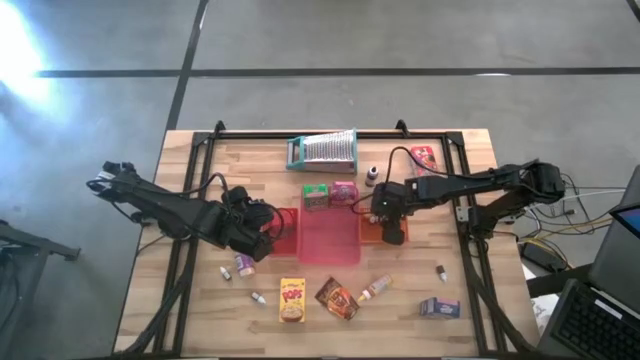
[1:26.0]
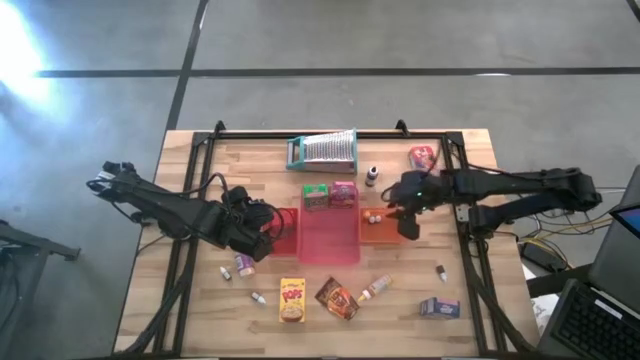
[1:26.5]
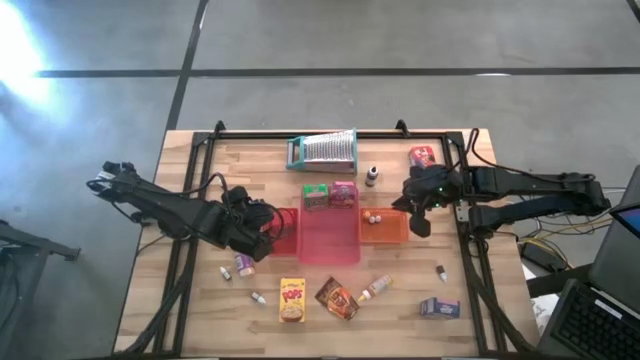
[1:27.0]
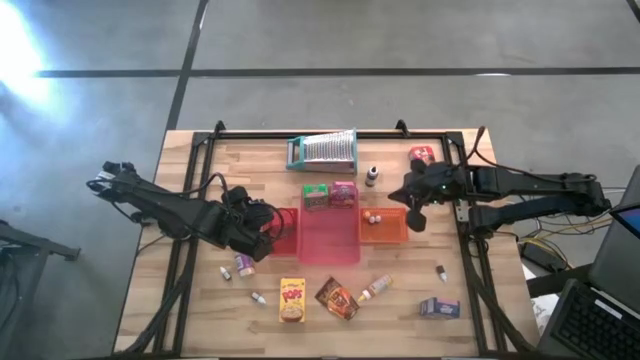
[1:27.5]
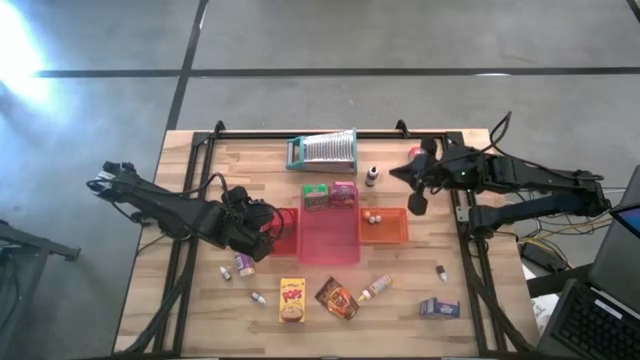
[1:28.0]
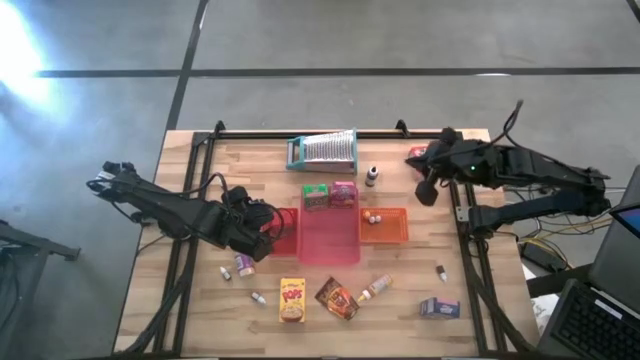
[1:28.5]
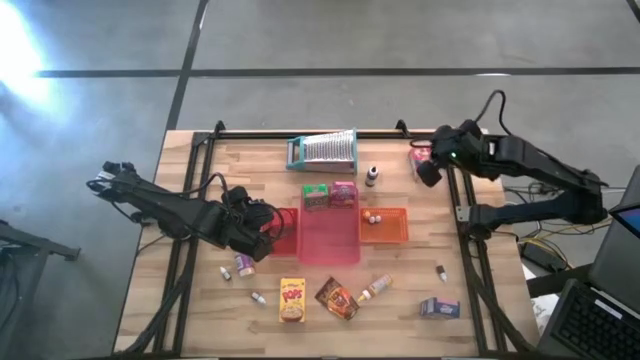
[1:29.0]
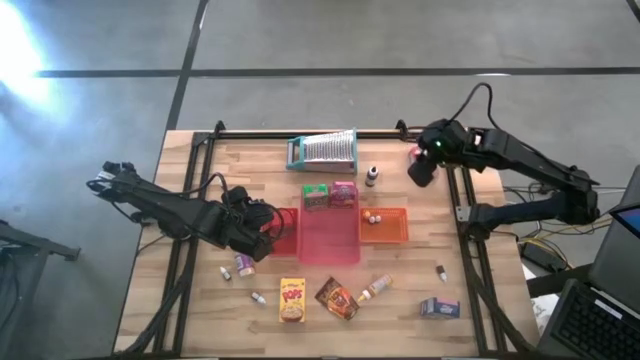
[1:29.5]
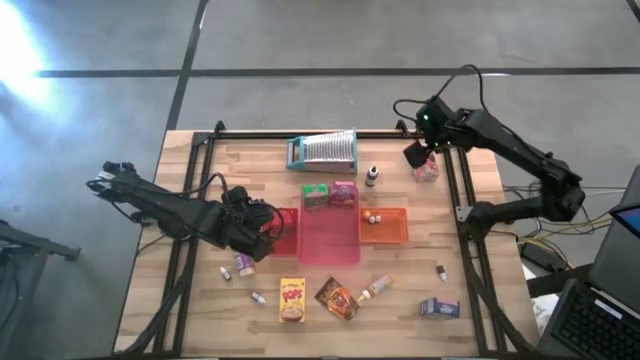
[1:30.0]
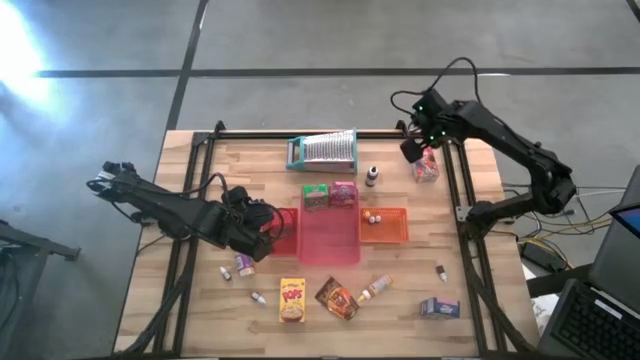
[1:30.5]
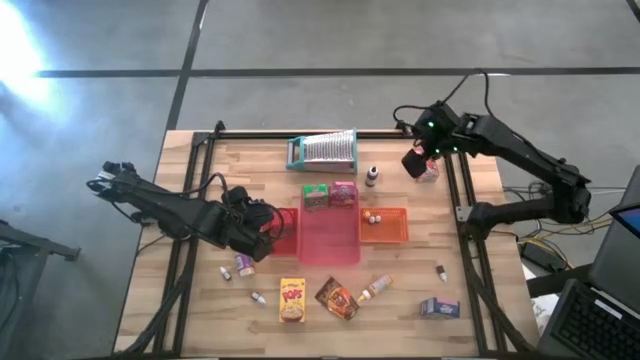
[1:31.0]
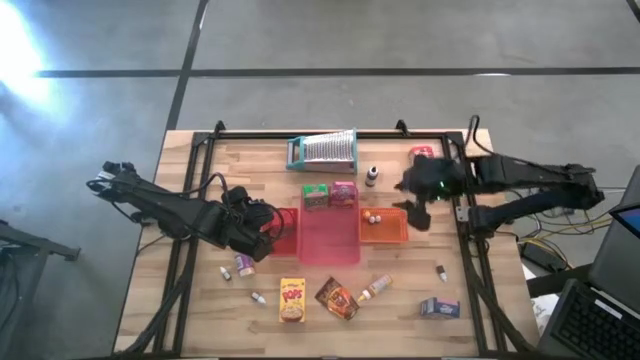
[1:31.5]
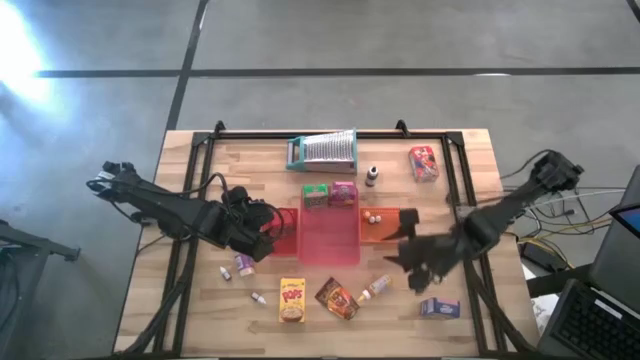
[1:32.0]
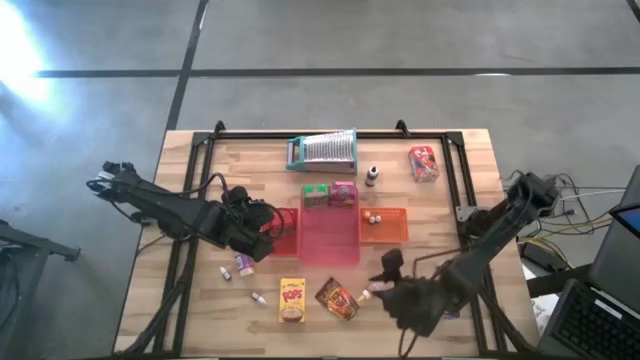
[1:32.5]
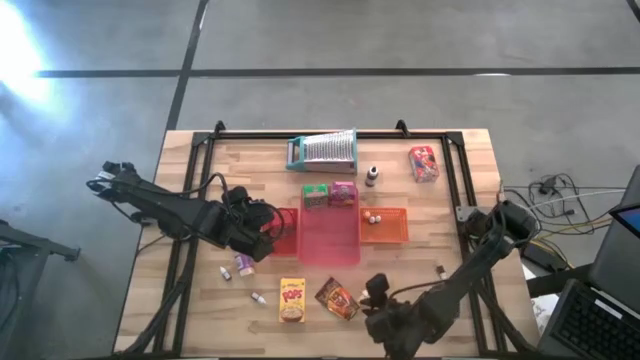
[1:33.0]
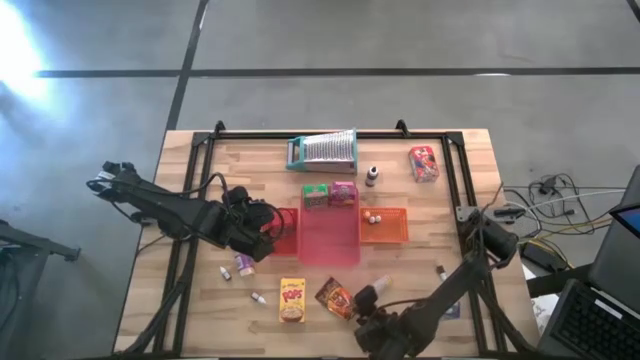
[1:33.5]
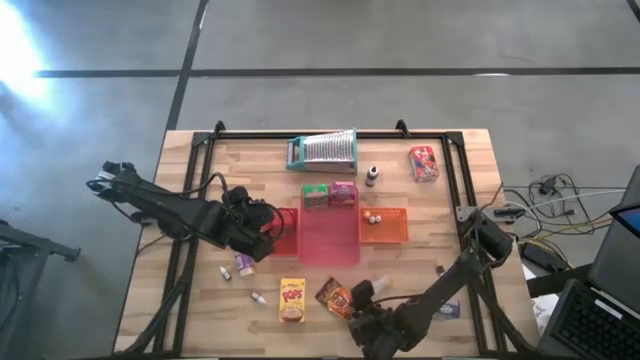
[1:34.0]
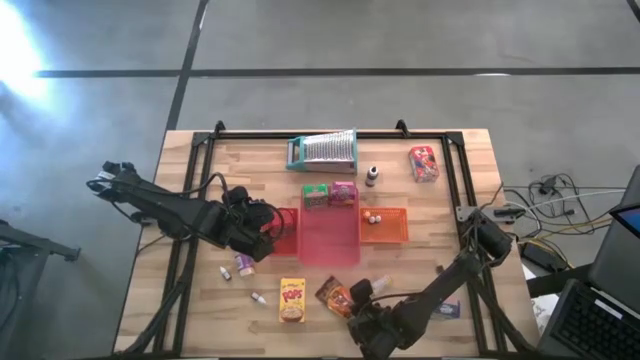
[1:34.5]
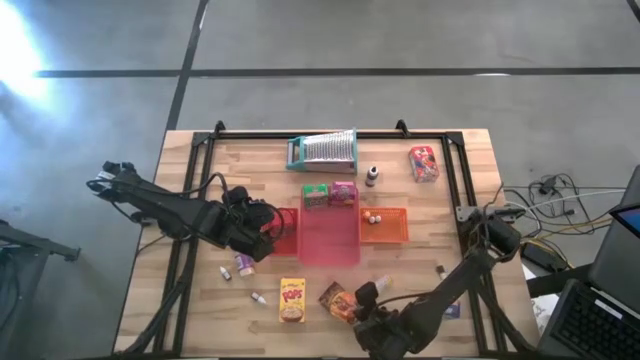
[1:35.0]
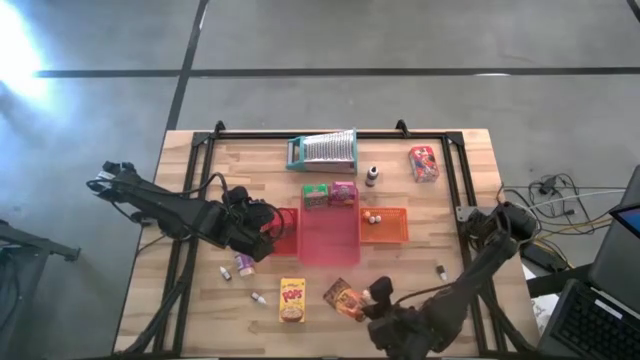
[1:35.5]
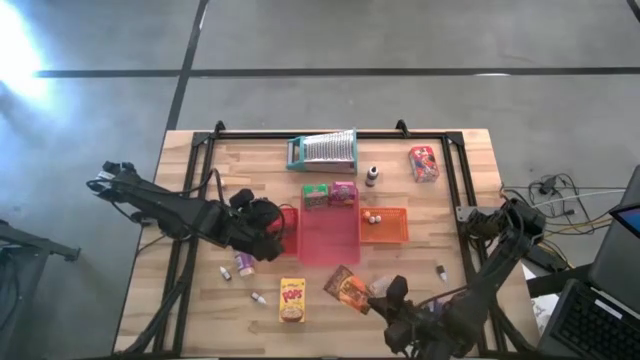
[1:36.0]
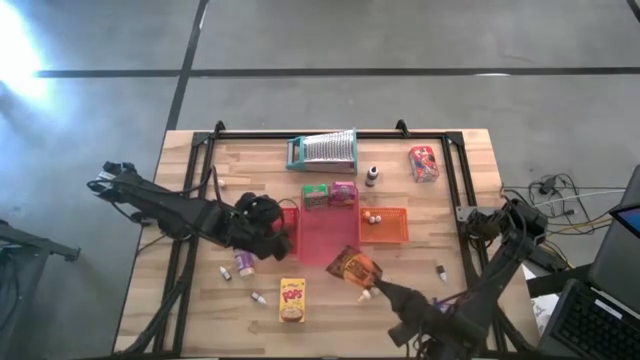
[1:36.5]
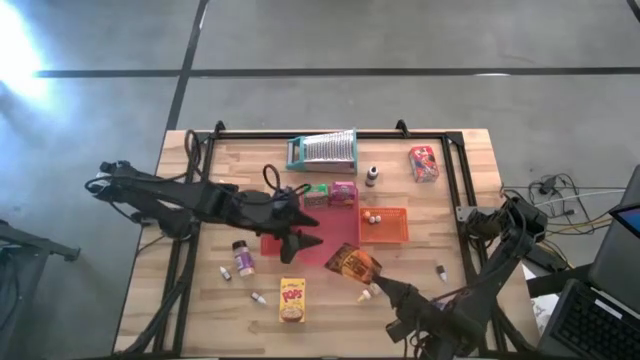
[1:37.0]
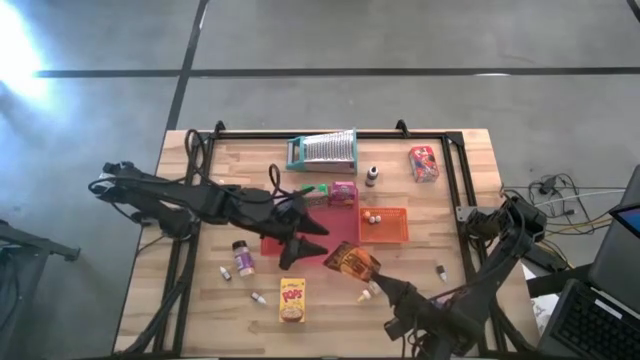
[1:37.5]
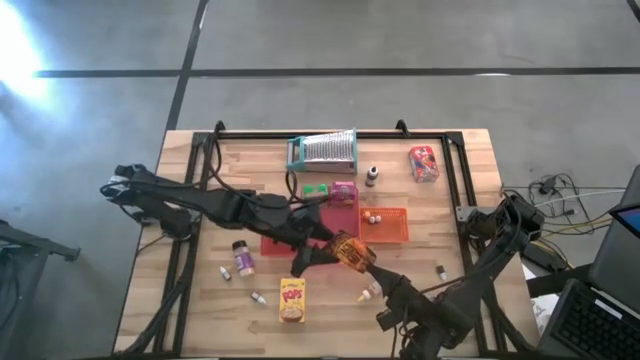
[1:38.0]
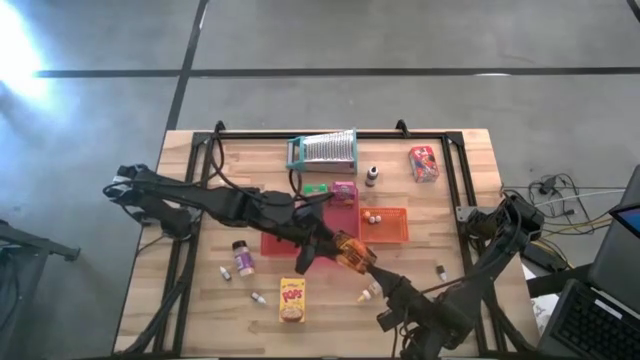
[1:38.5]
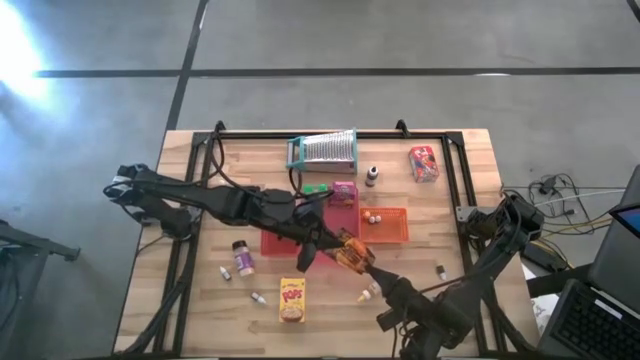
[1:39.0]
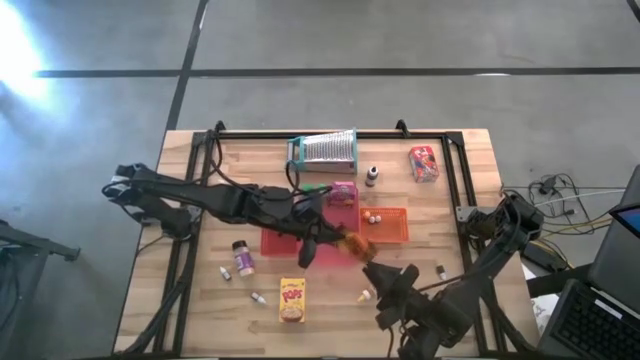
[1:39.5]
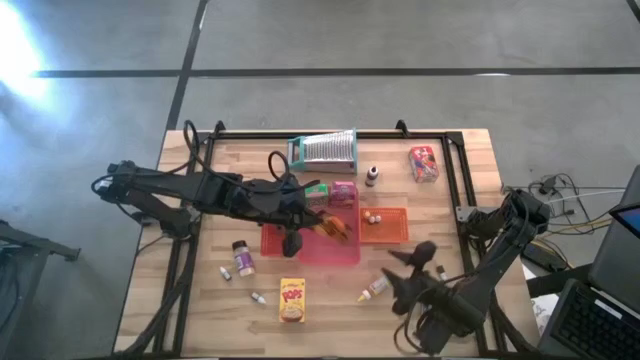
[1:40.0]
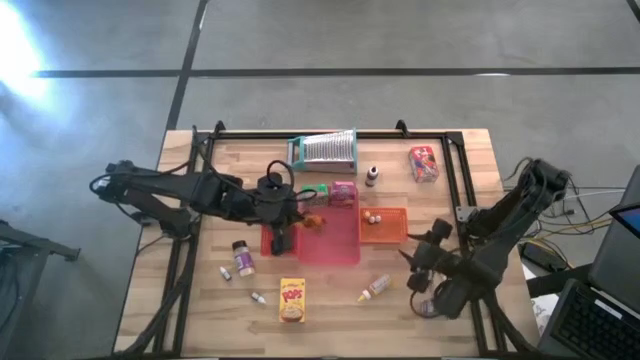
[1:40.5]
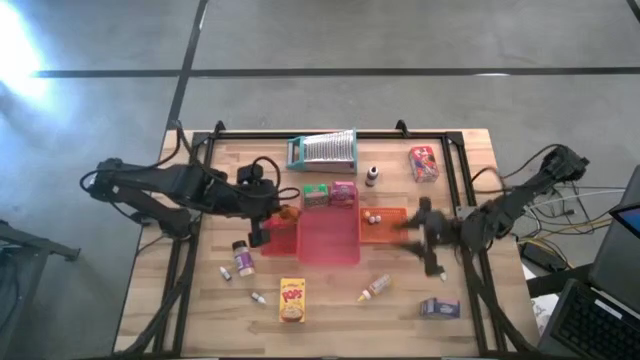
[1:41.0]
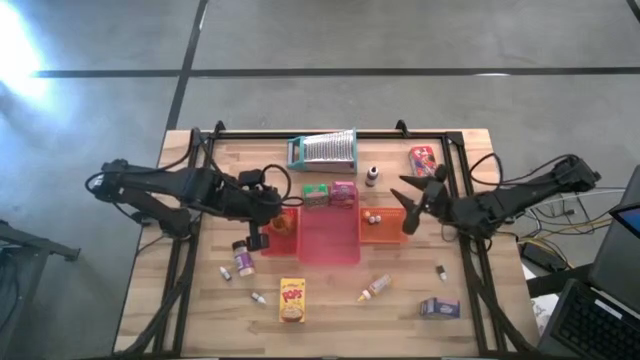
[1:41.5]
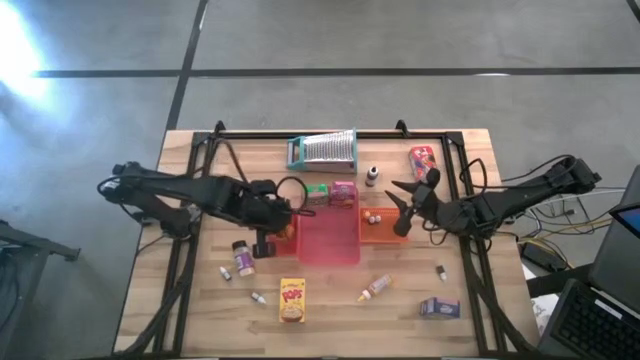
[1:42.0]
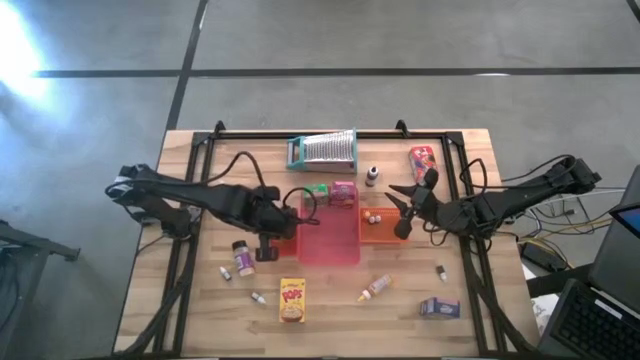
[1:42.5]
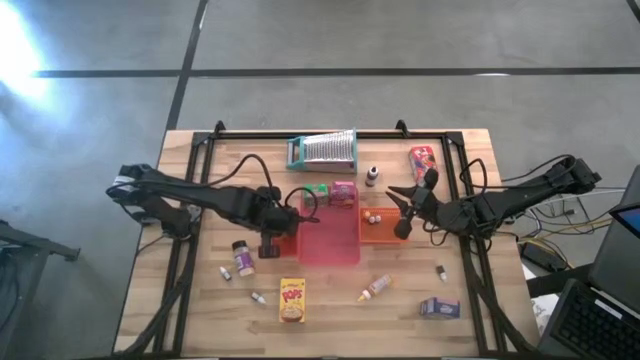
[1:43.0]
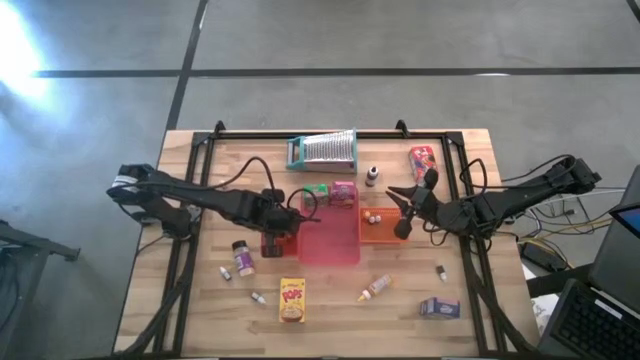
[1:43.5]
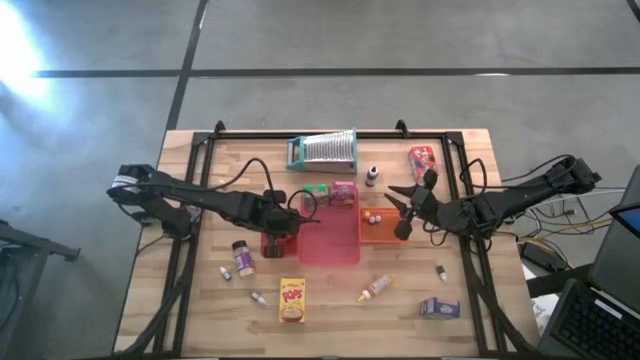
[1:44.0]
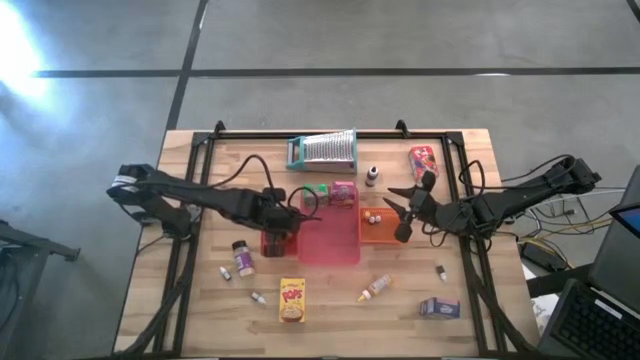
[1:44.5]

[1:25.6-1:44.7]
Task: Pick & Place Kitchen Items
Put the orange spice bag into the red bin

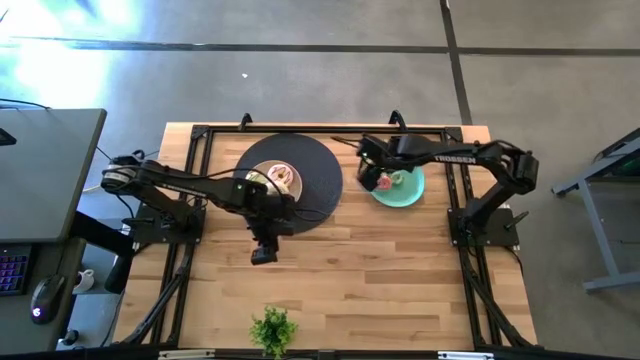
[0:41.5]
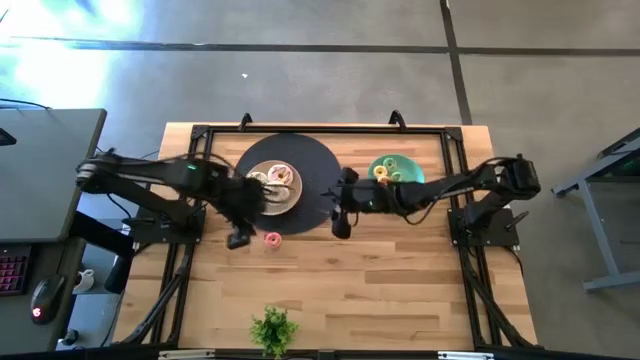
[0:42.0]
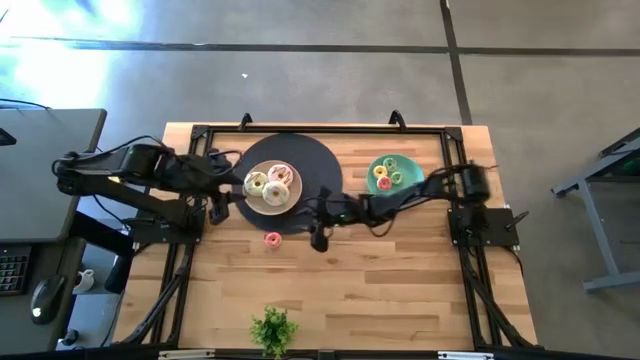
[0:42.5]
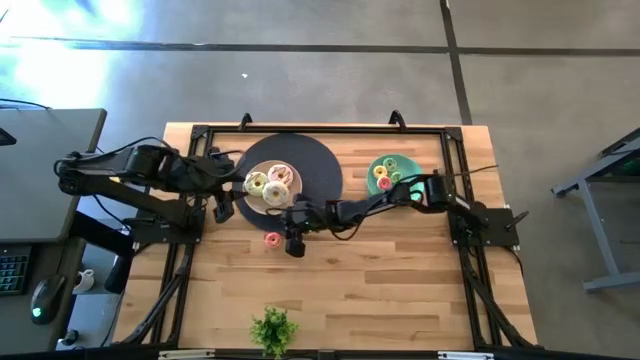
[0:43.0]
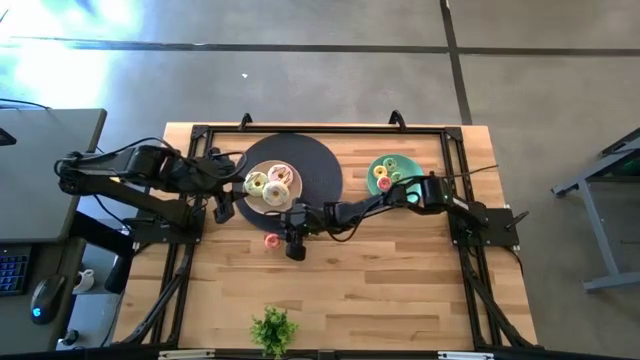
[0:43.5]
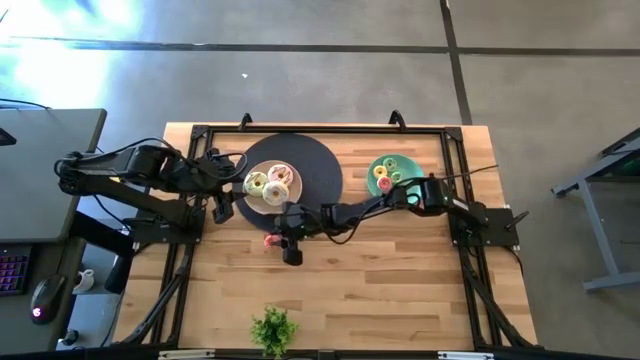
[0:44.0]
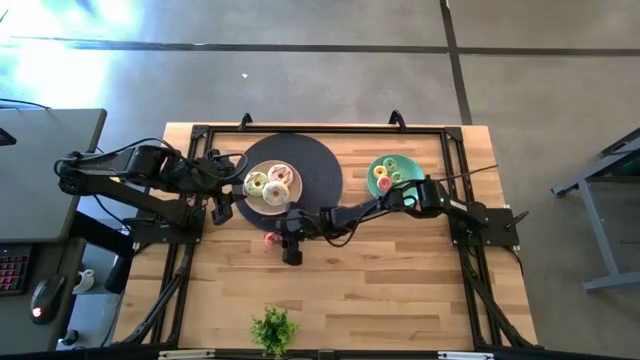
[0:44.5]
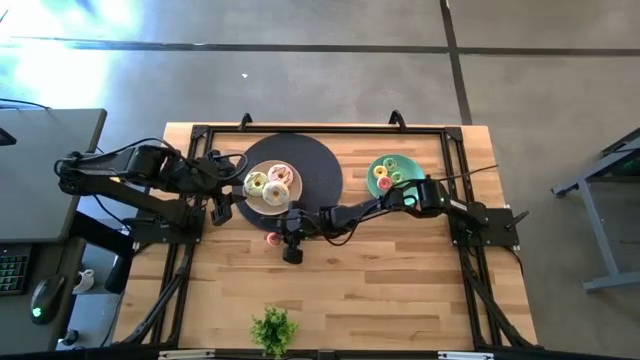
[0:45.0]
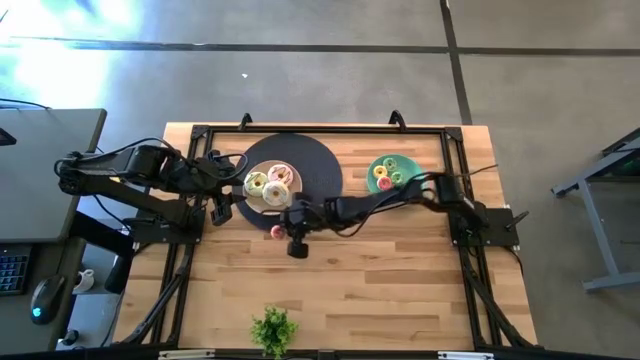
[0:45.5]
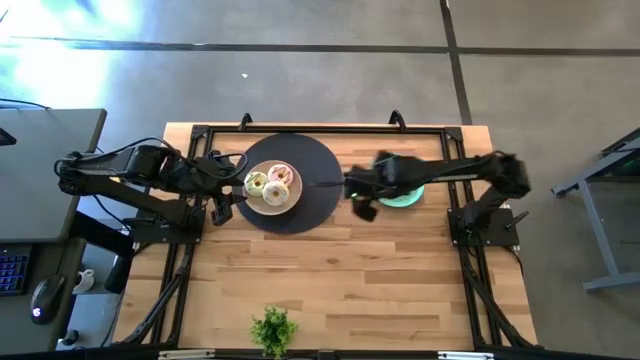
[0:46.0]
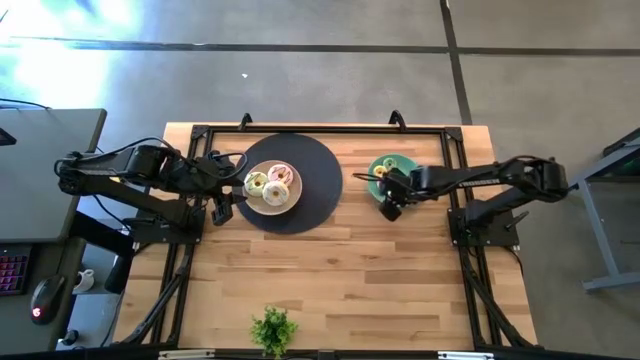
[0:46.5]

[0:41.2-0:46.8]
Task: Pick & Place donuts
Put the small pink donut on the green plate
